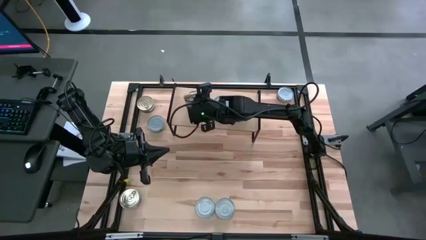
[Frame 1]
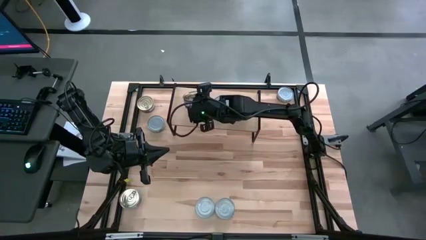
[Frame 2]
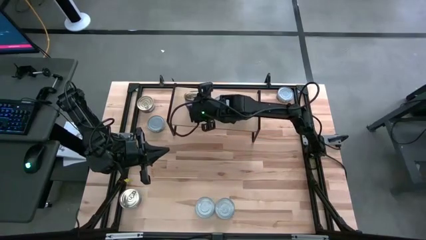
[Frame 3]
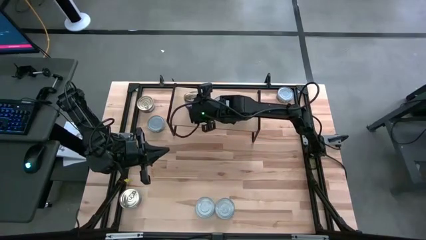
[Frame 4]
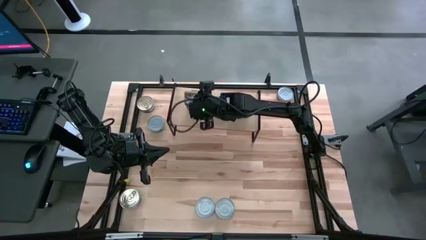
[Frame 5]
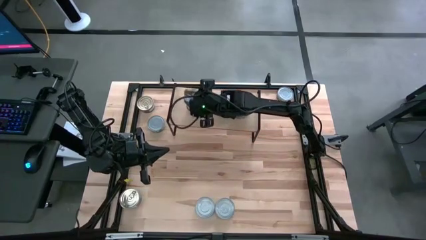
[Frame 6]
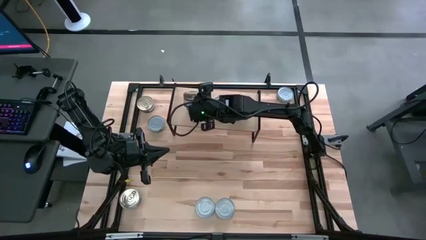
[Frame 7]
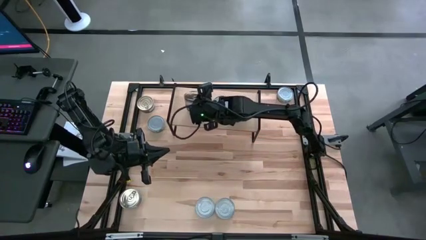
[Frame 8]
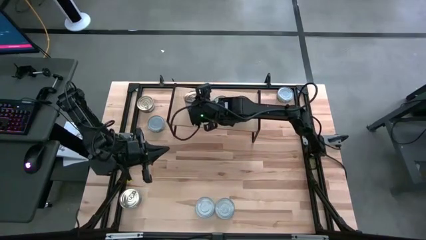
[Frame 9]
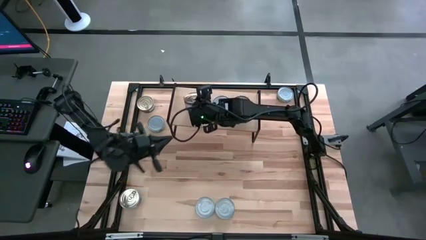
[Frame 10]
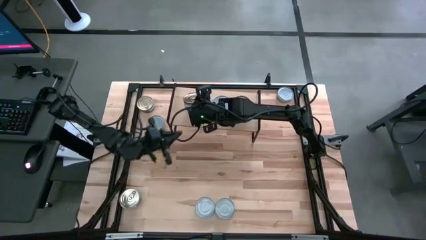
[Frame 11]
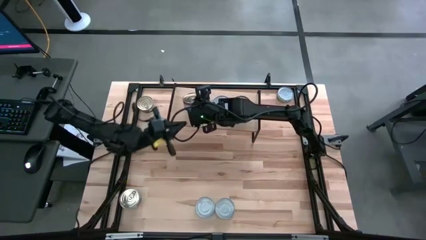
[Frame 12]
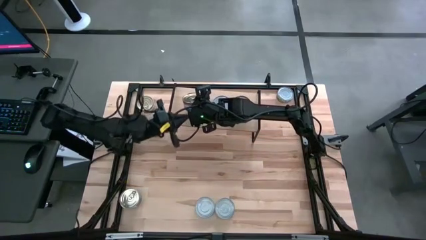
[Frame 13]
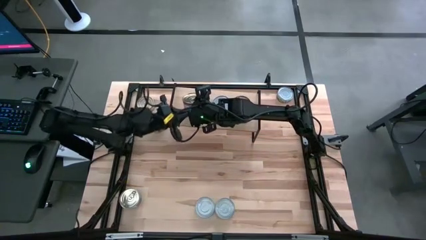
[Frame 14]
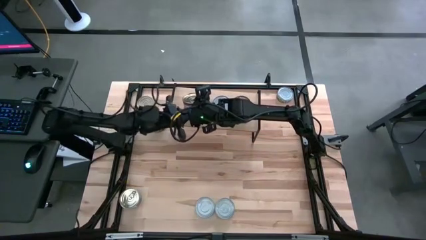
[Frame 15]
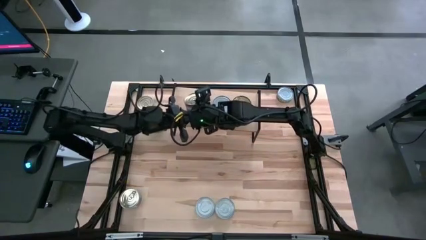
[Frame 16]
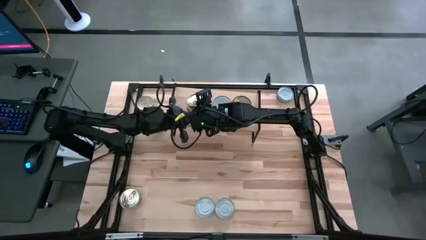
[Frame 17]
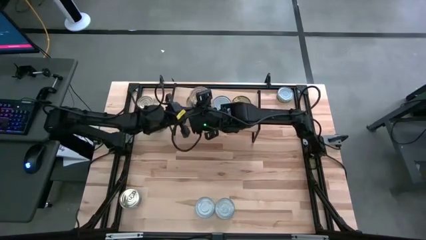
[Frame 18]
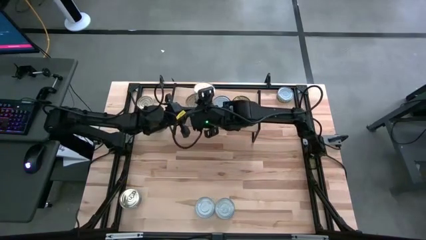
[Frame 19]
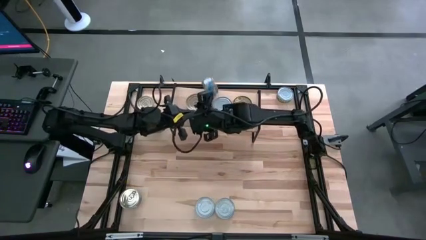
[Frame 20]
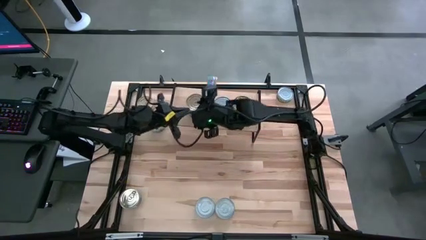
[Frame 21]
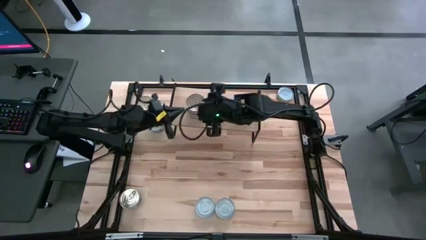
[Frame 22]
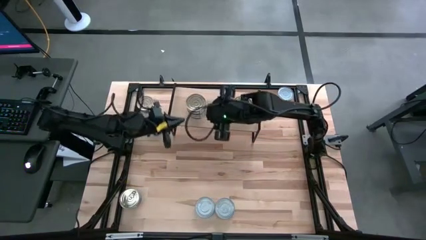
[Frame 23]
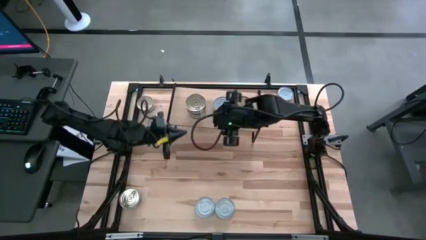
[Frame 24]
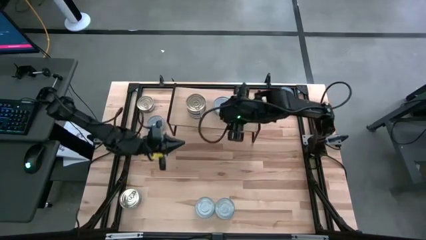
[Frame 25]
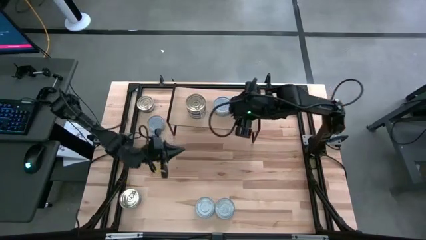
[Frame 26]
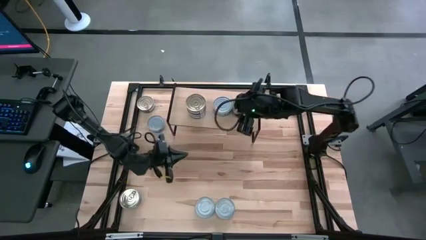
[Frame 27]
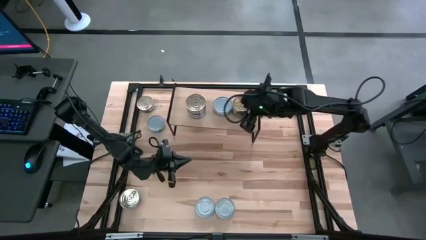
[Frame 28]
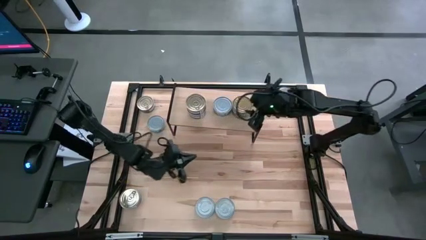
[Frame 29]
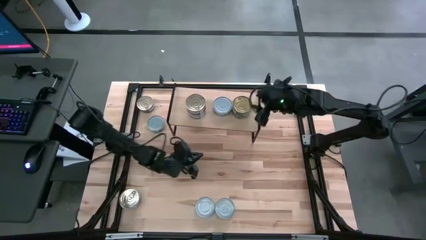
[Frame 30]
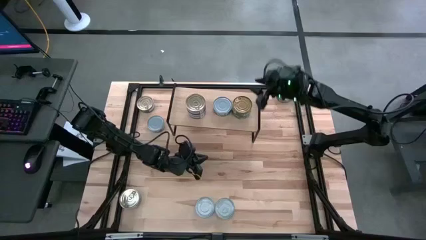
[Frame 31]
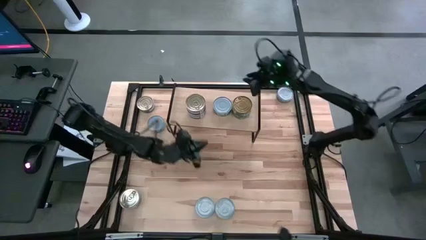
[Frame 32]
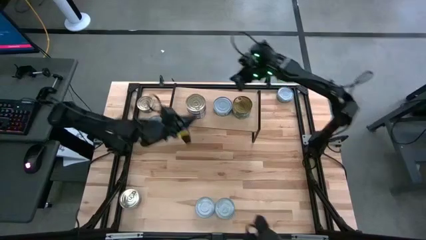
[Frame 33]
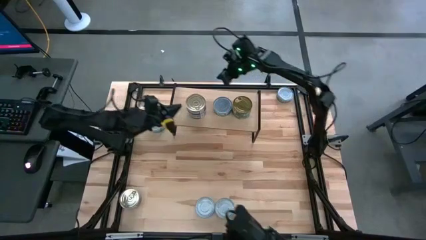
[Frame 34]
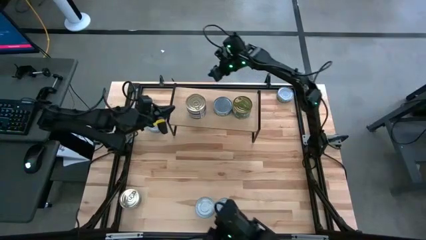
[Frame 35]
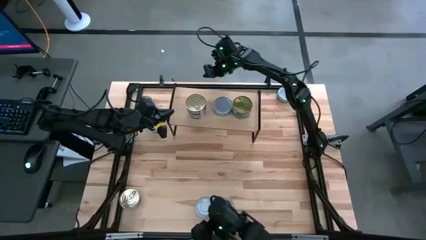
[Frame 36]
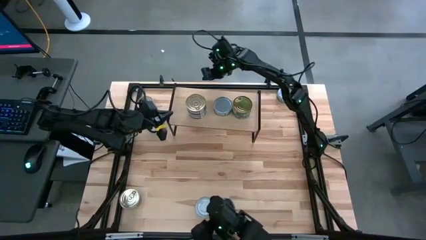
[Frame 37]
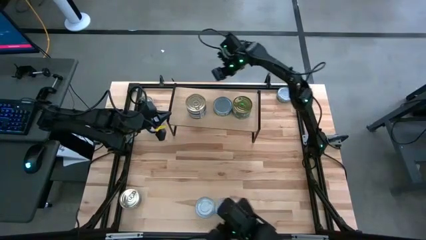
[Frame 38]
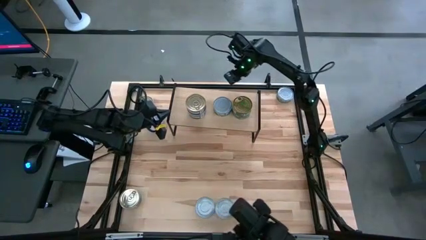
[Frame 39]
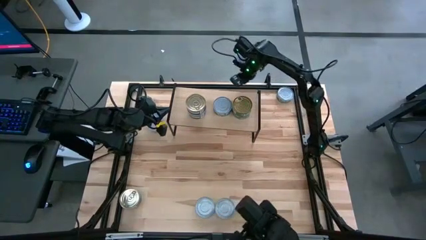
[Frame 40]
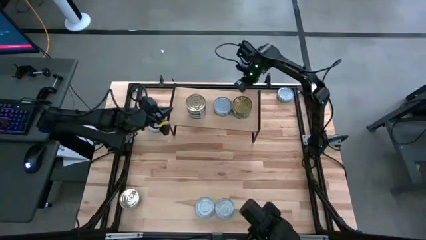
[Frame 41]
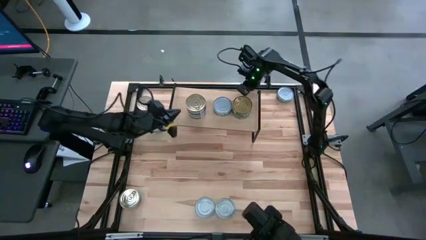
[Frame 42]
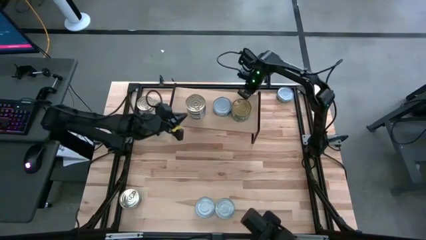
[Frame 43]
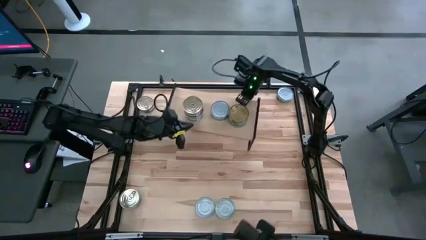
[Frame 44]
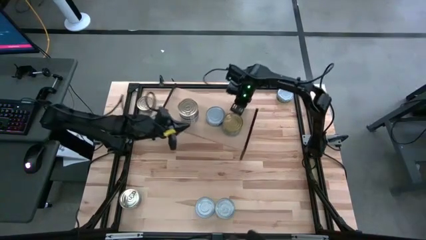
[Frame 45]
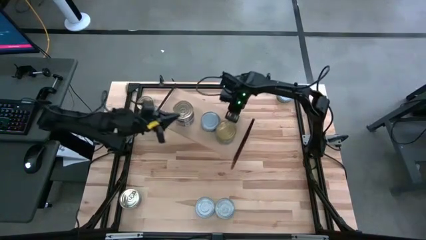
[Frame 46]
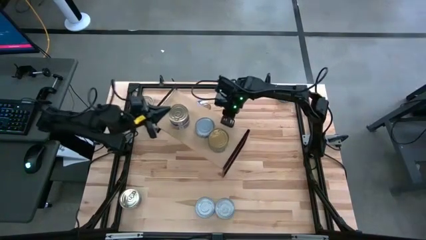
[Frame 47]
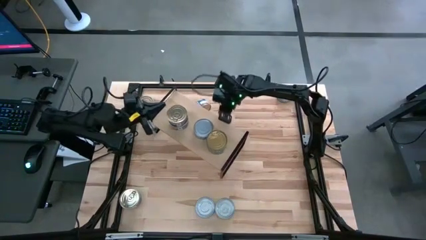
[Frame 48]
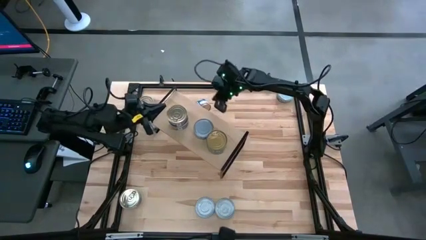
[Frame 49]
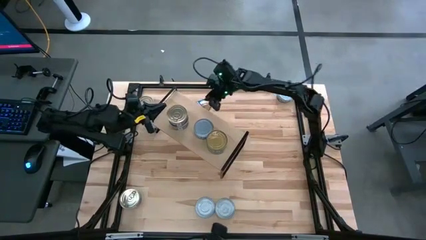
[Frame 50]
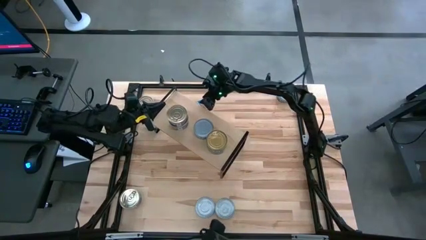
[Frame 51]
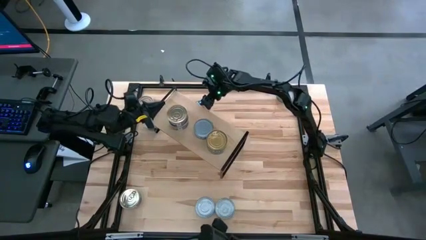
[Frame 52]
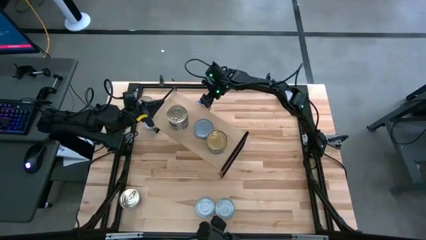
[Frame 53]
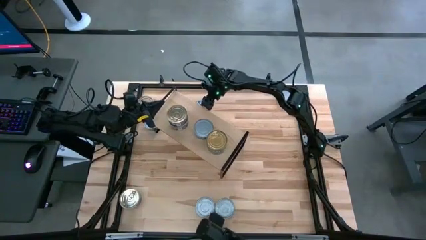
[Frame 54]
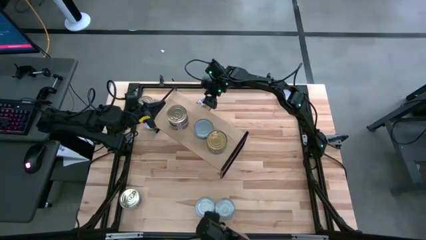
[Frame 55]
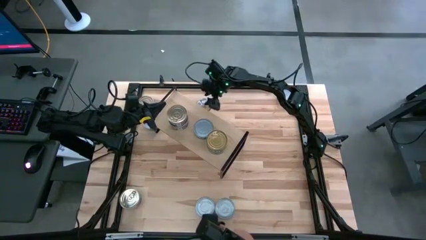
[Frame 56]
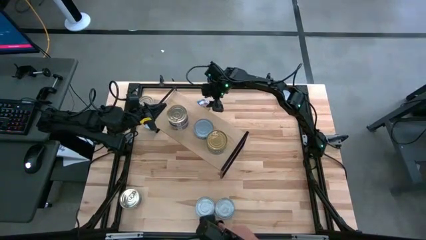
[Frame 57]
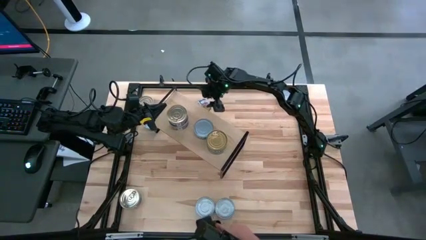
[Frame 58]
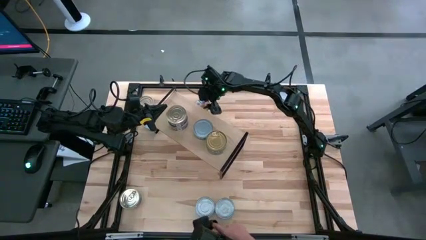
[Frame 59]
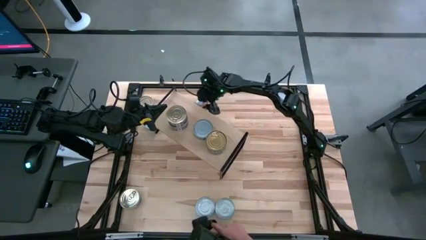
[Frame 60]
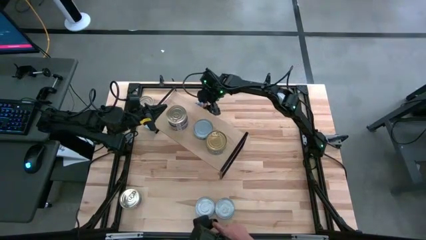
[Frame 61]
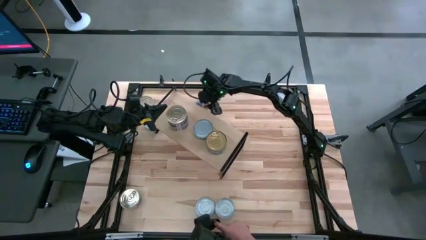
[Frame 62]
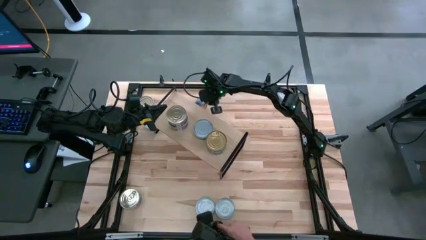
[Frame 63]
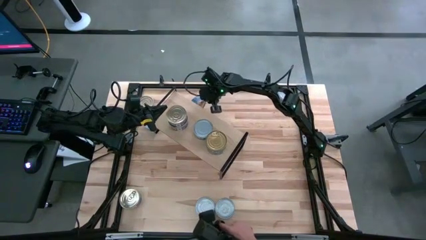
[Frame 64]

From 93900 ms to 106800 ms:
Task: Stack canned seafood by type on shelf
Stack the blue-pink tuna can on top of the blue-pink tuna can on the shelf
